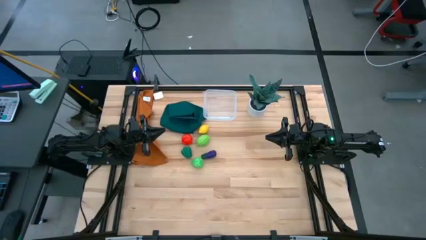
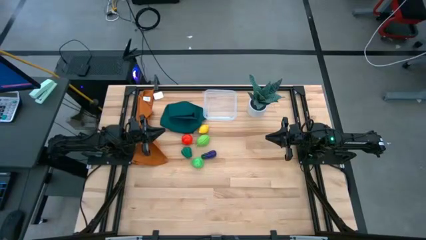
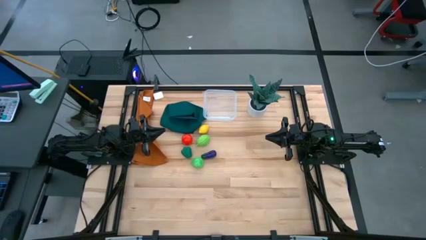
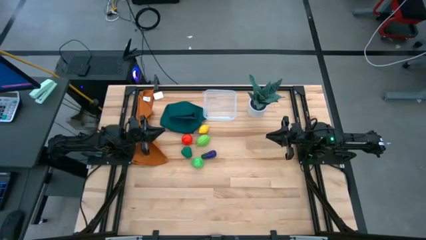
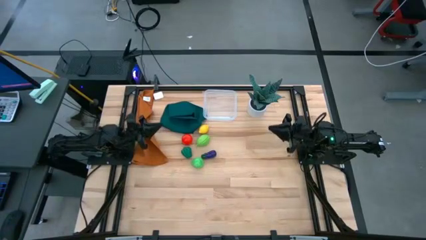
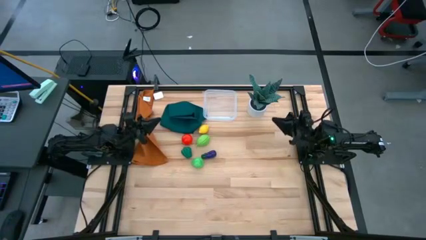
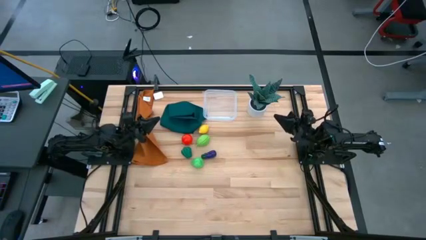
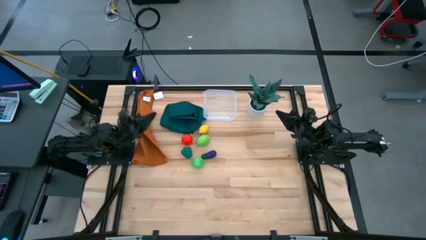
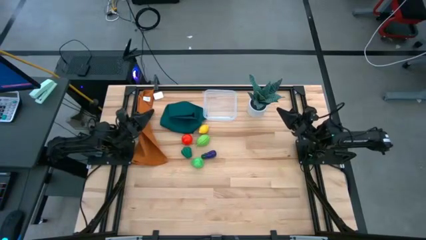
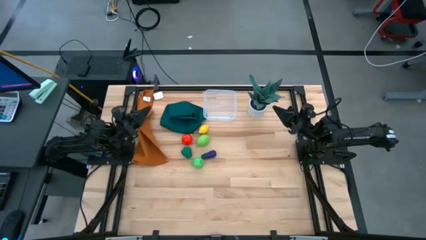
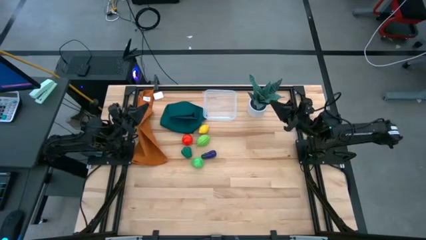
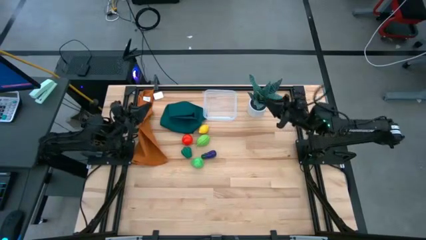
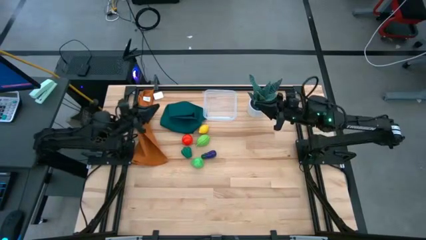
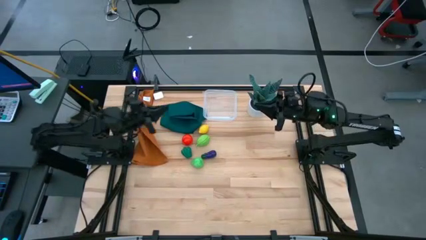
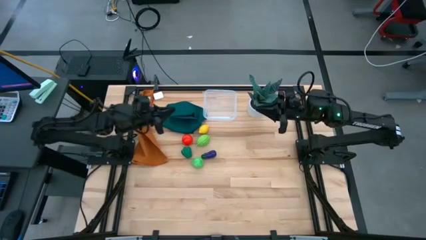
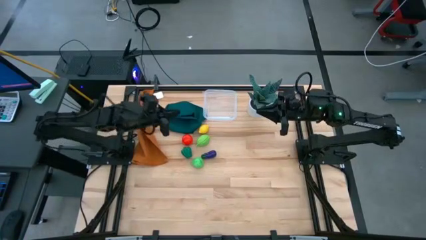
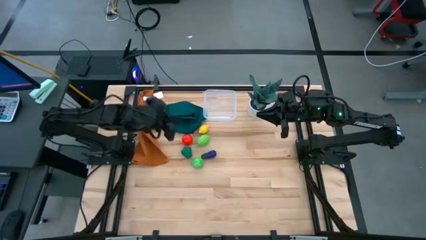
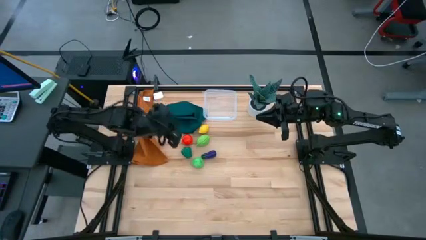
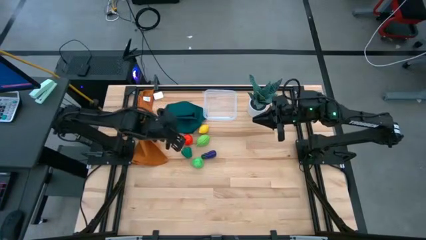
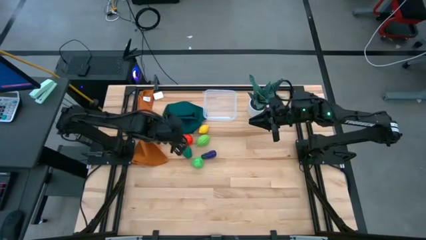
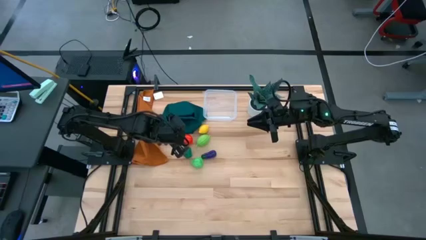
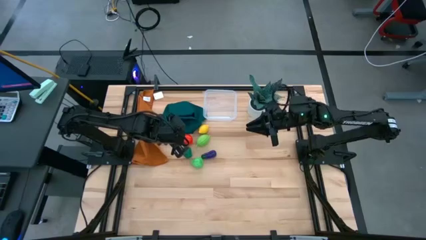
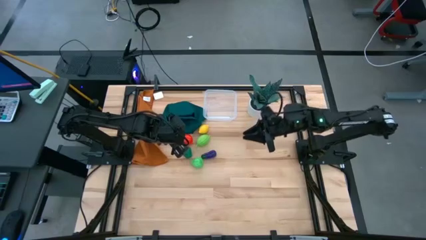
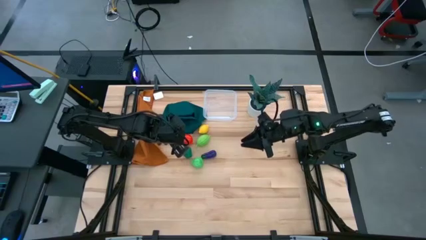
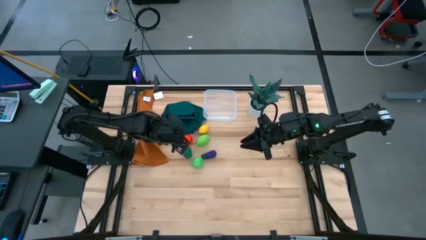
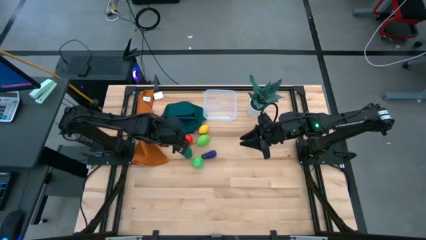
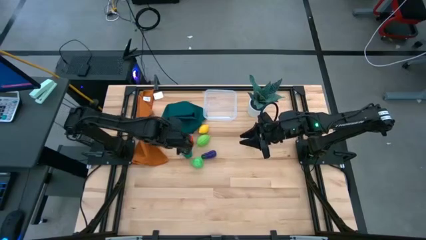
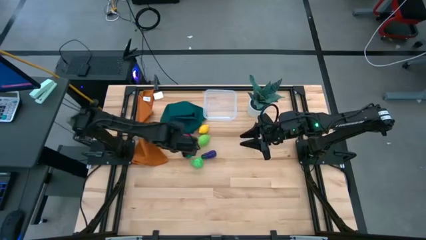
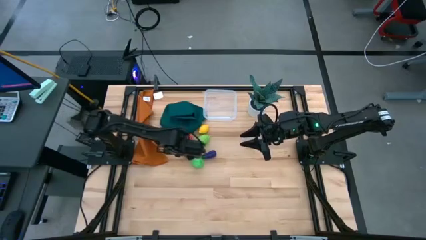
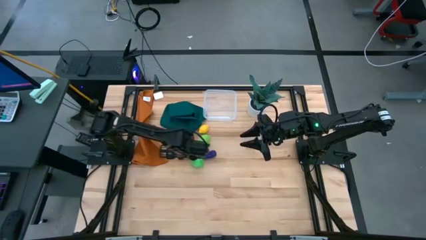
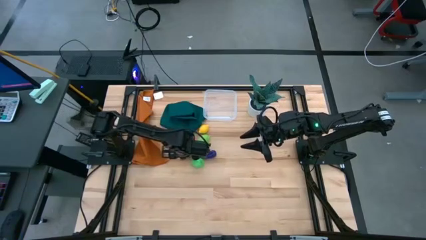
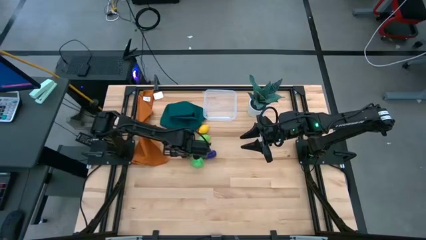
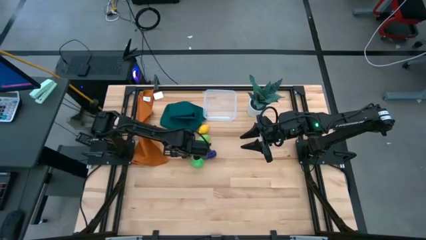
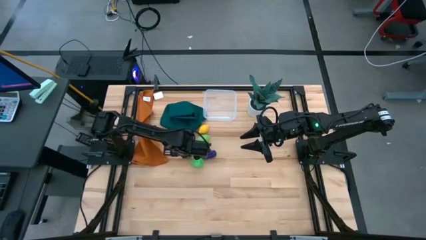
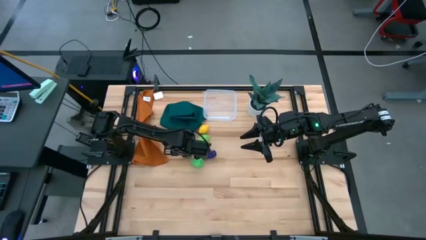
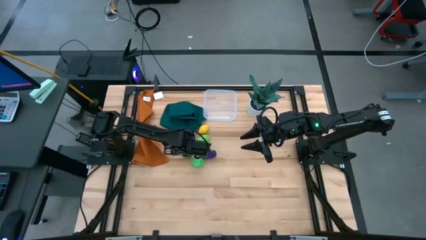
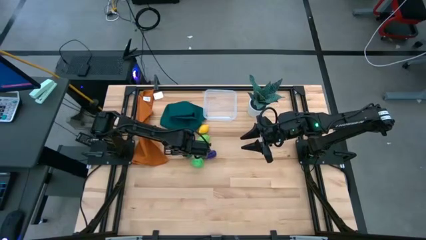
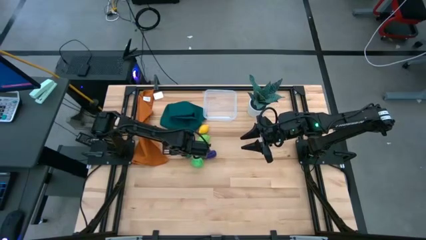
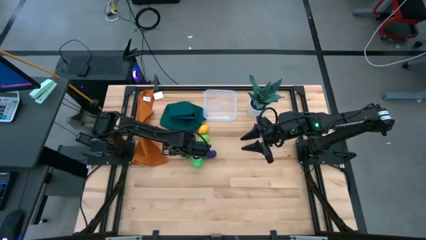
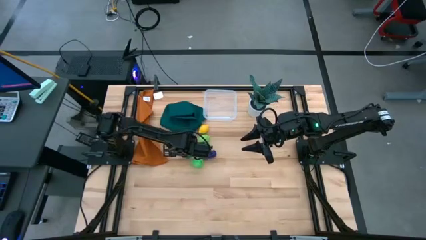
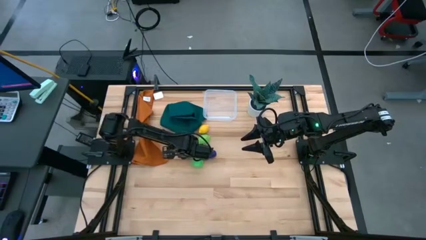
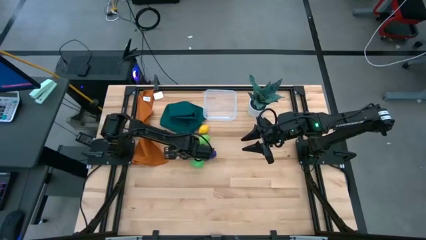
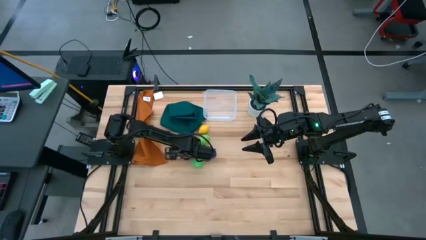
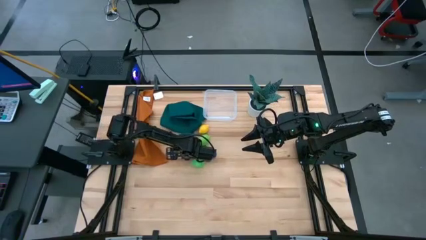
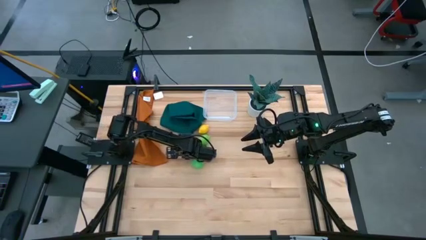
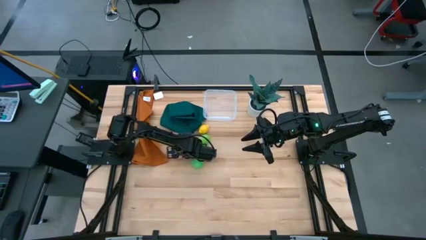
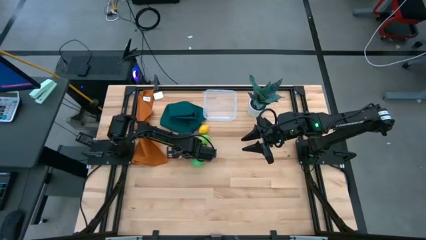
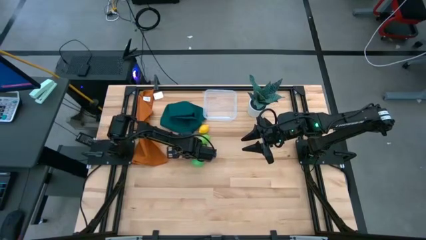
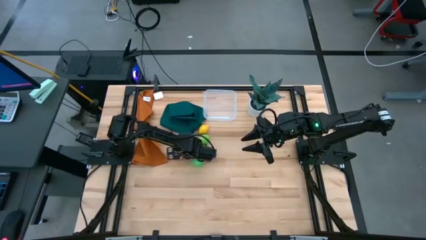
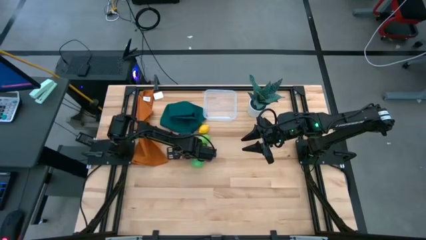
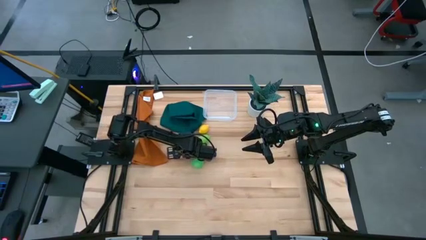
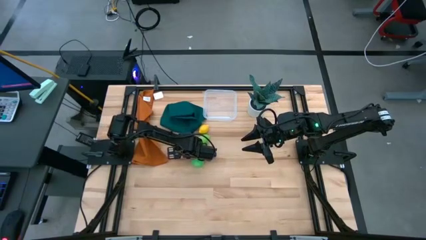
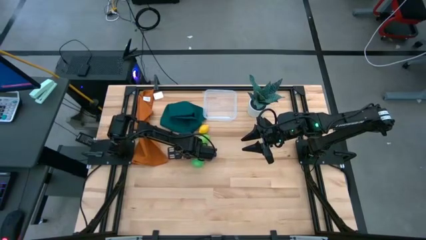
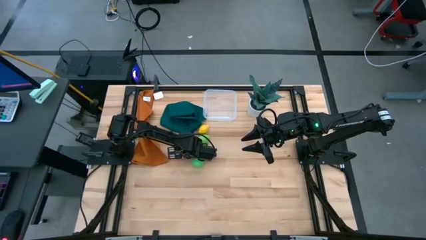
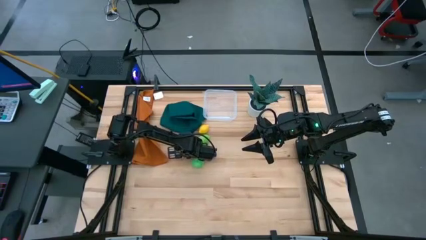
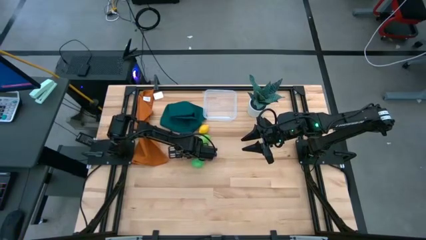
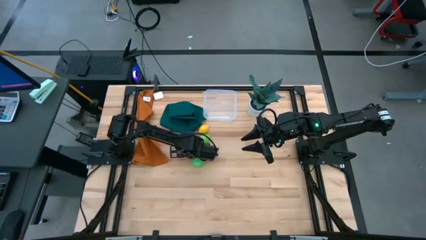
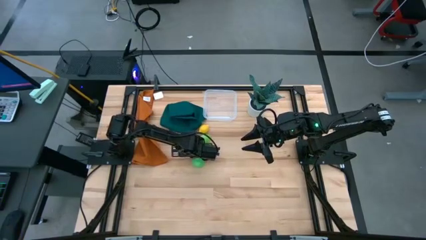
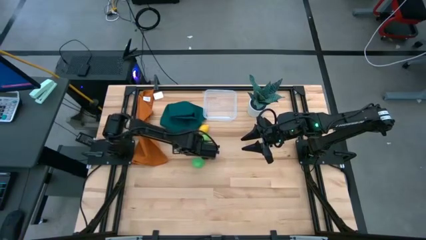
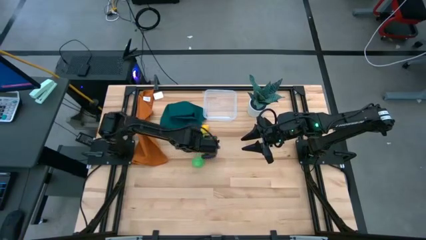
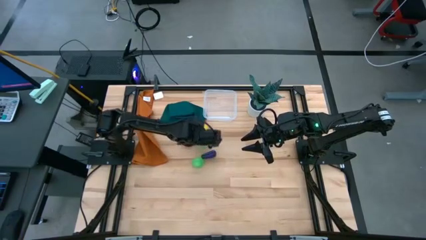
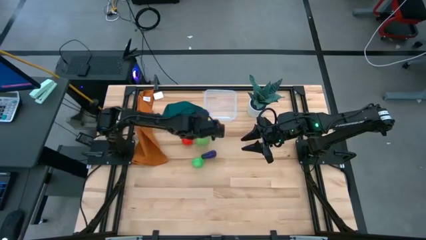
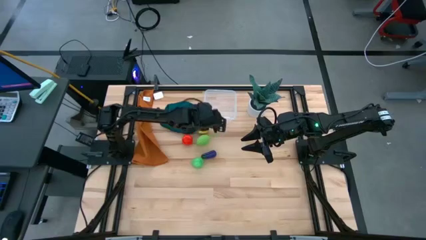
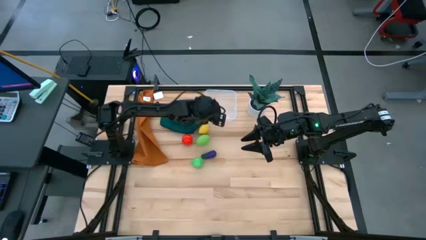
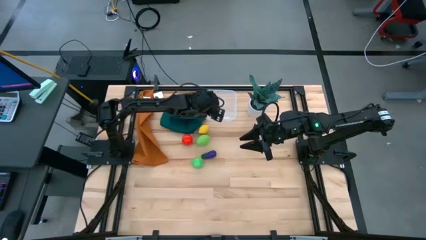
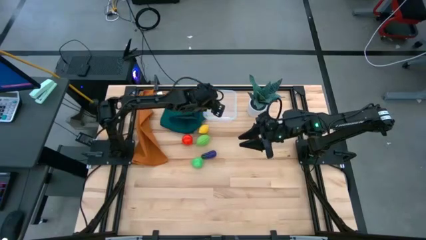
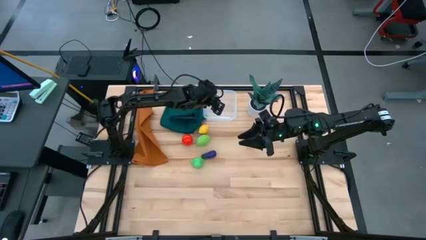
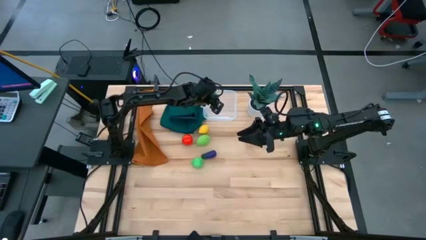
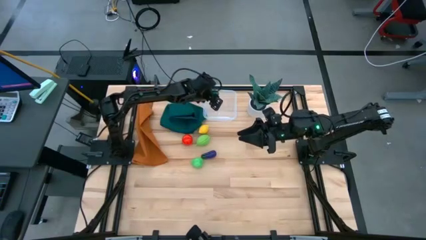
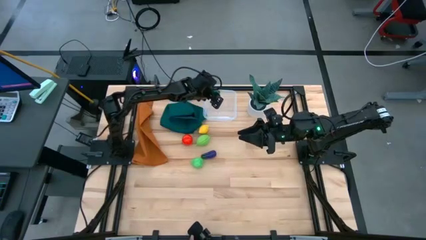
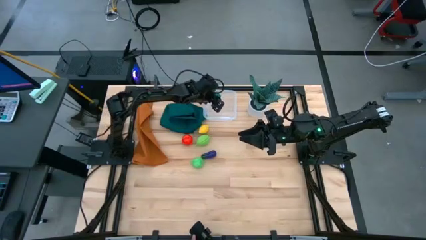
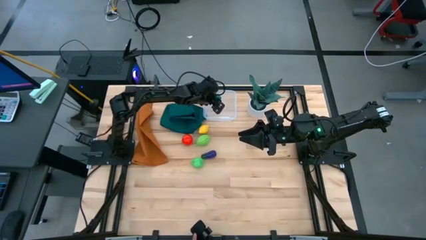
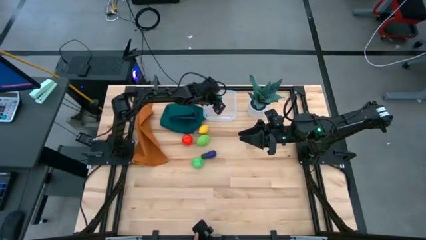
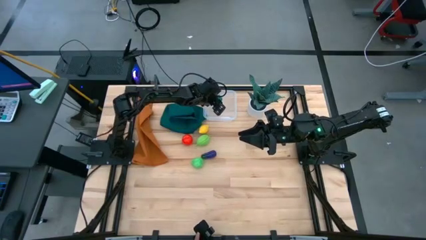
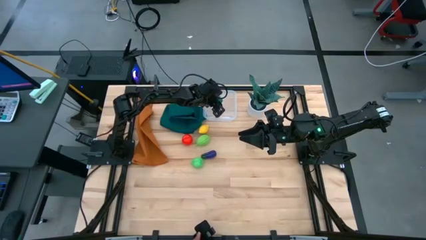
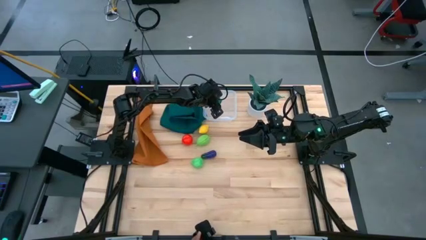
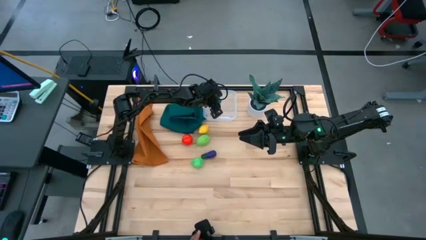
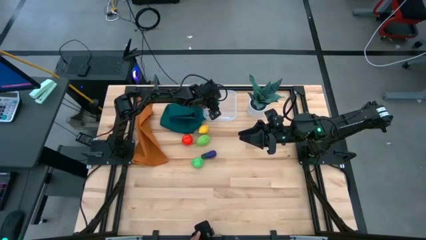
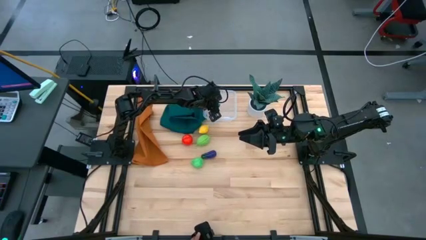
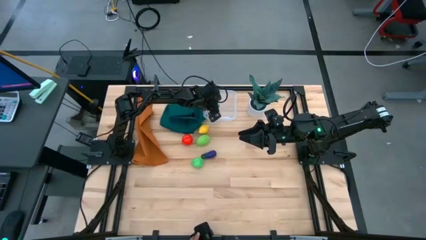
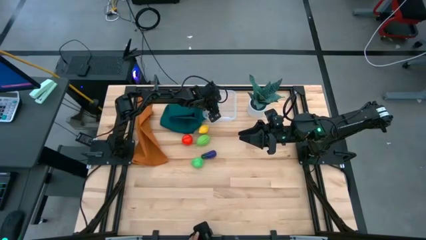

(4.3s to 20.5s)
Task: Pick and placing Produce into tupperware
Put the green bell pepper into the transparent bin
